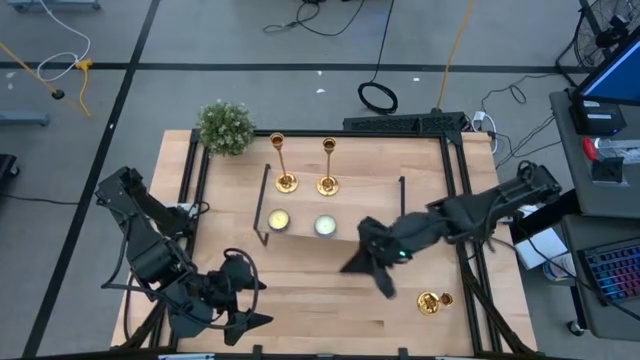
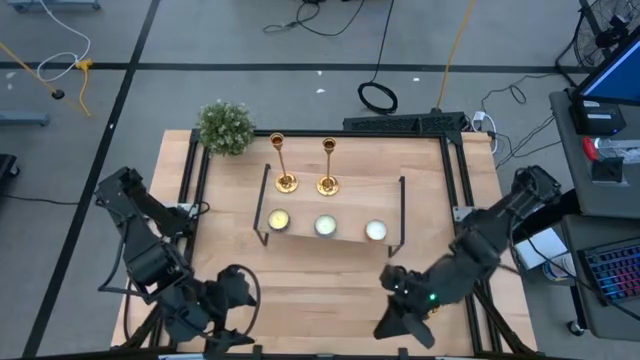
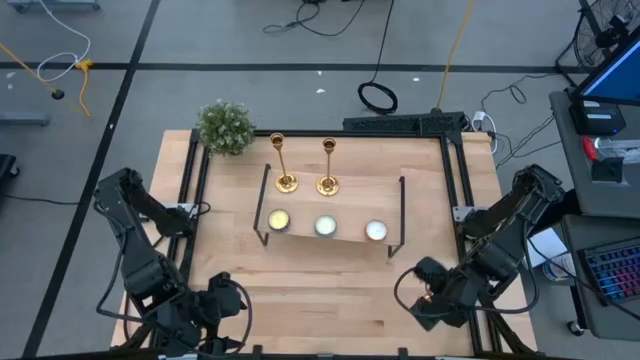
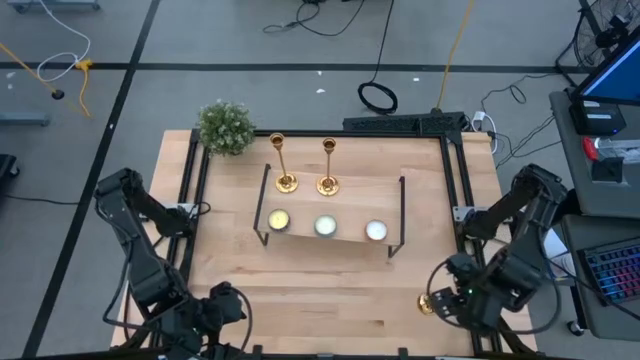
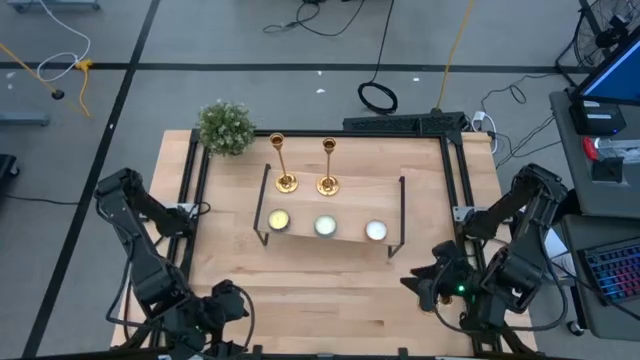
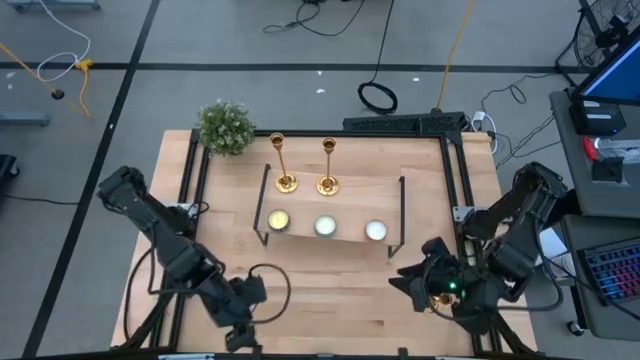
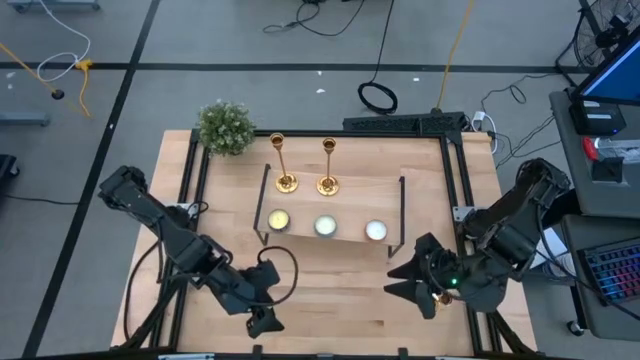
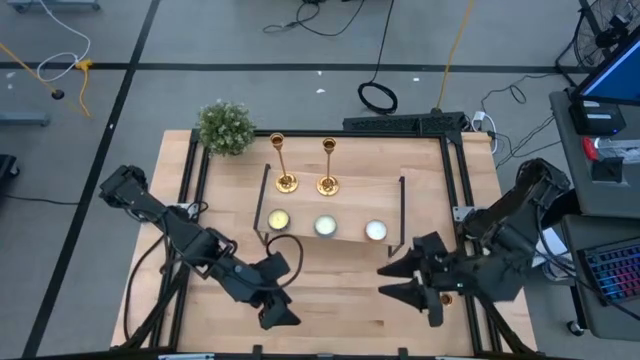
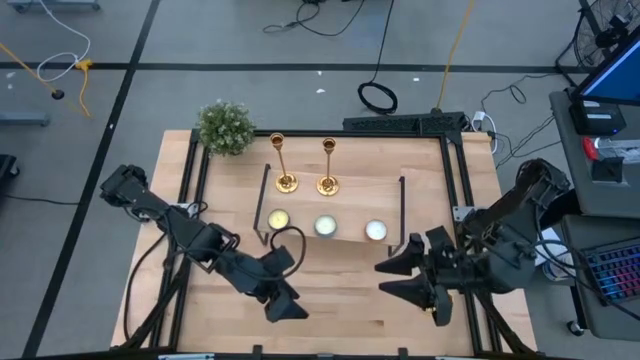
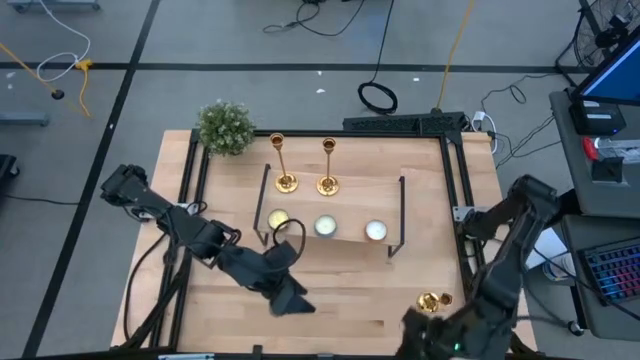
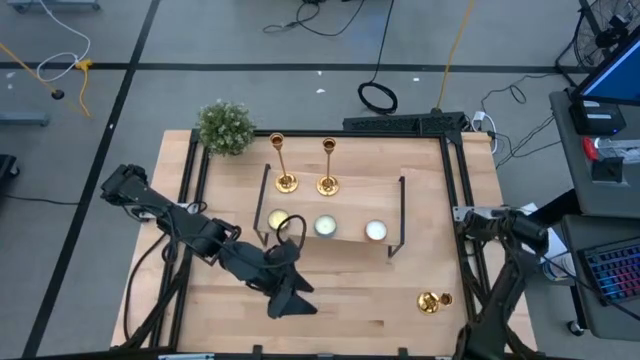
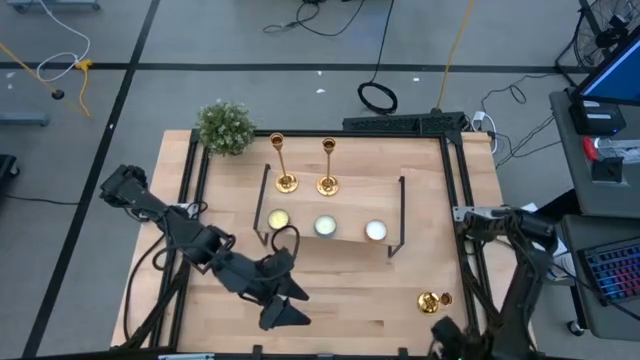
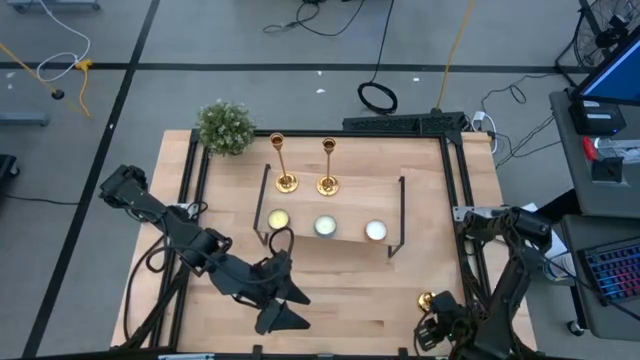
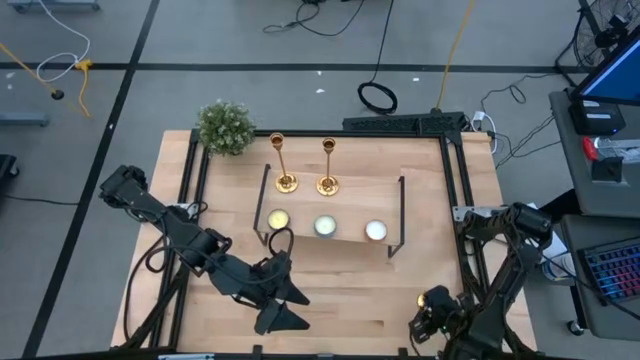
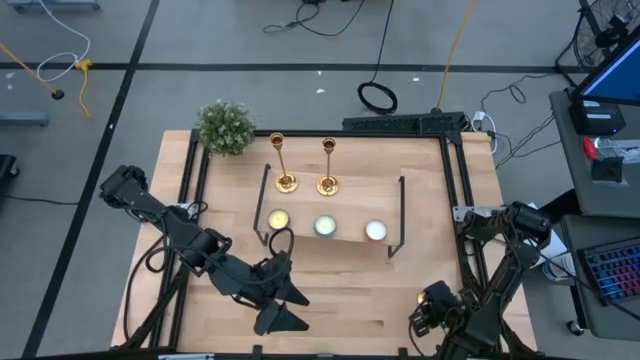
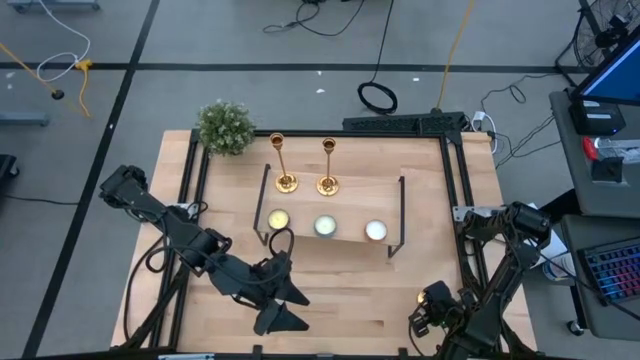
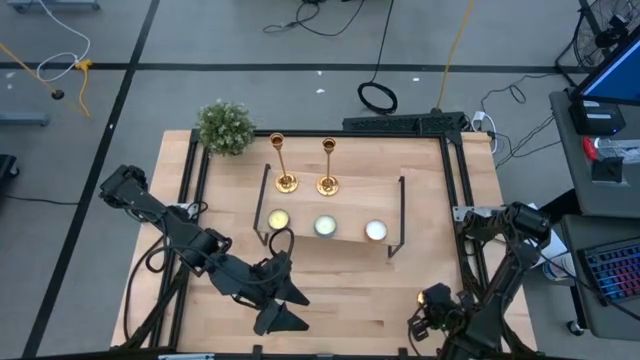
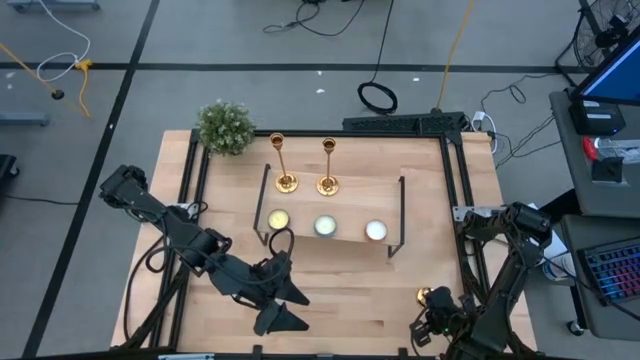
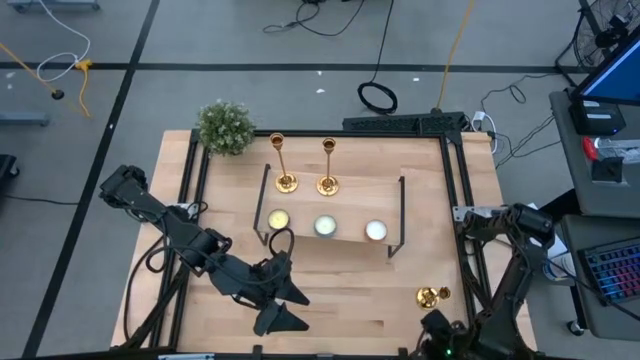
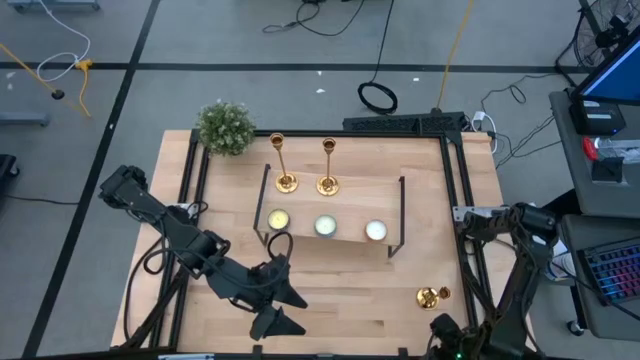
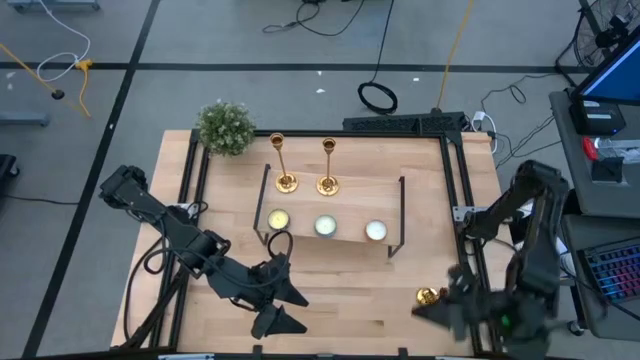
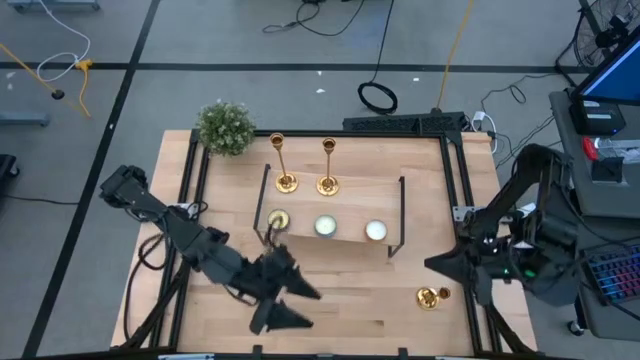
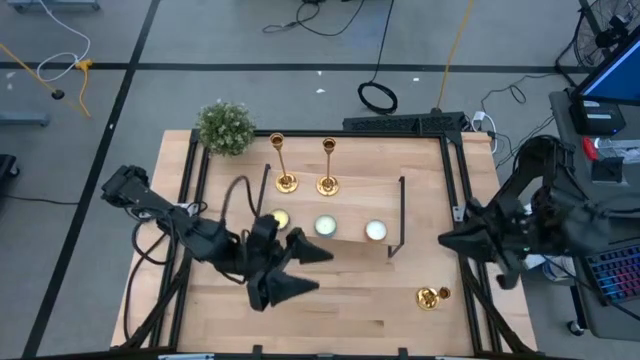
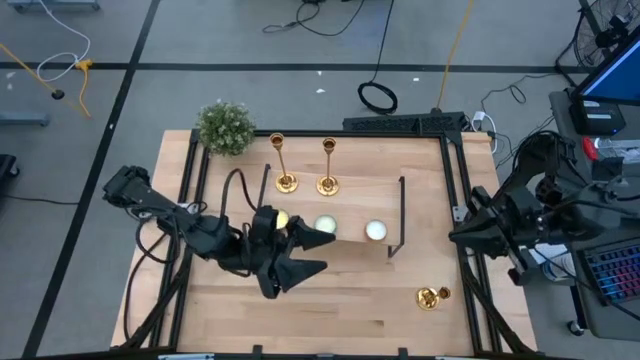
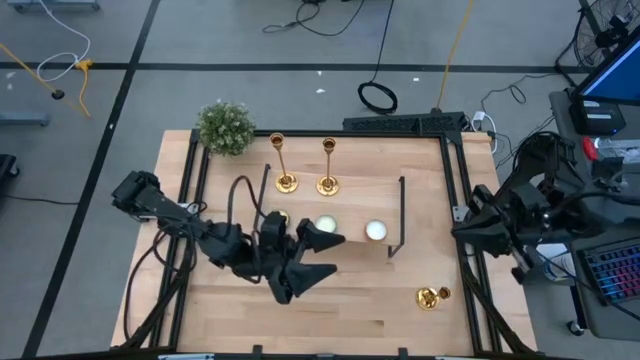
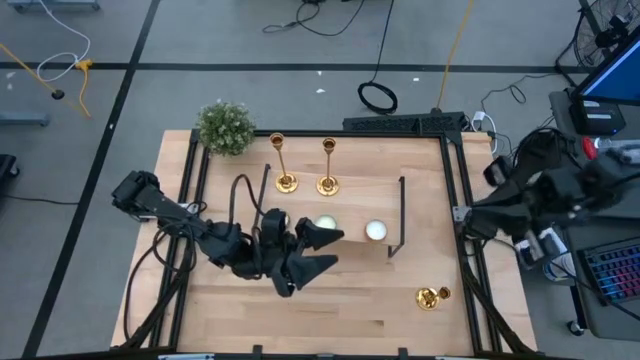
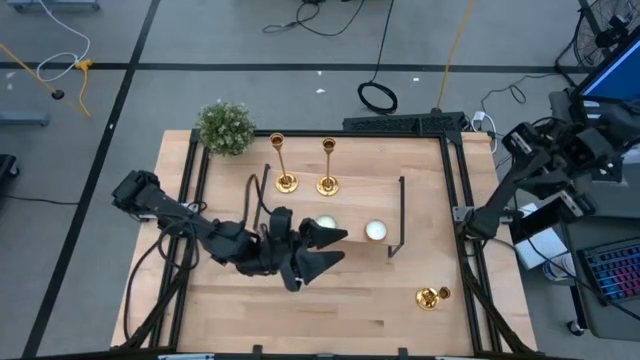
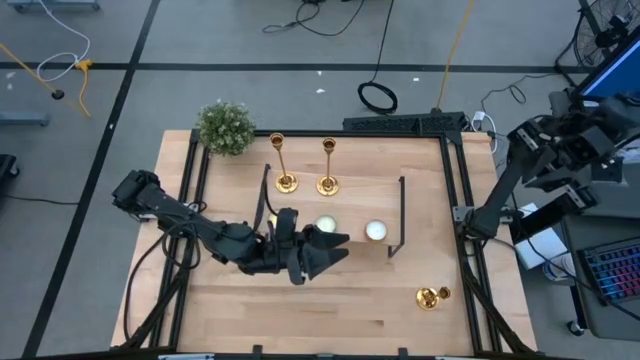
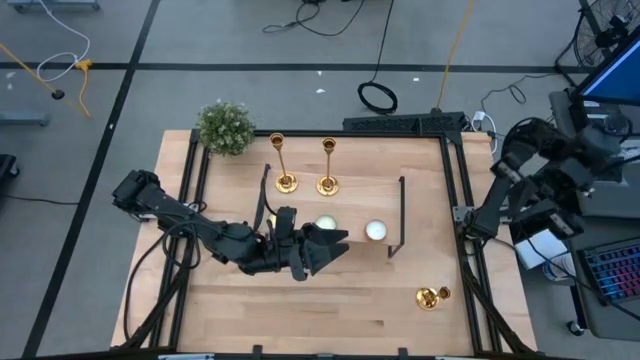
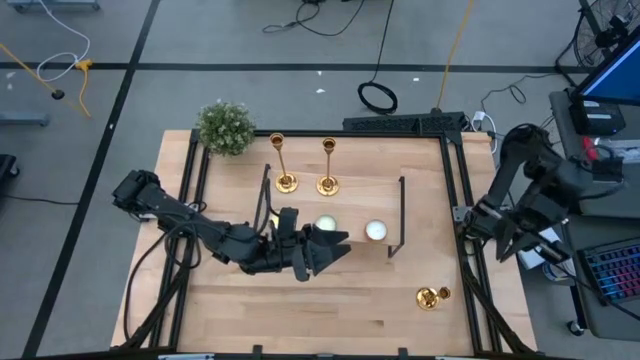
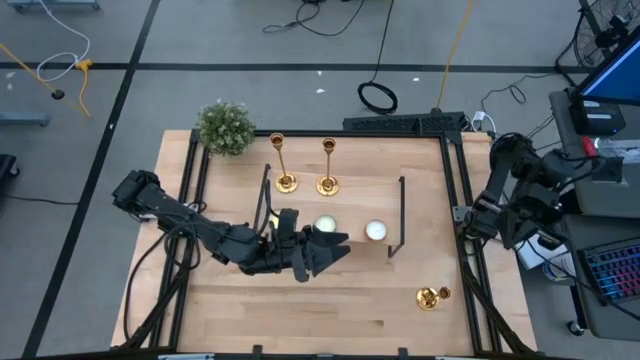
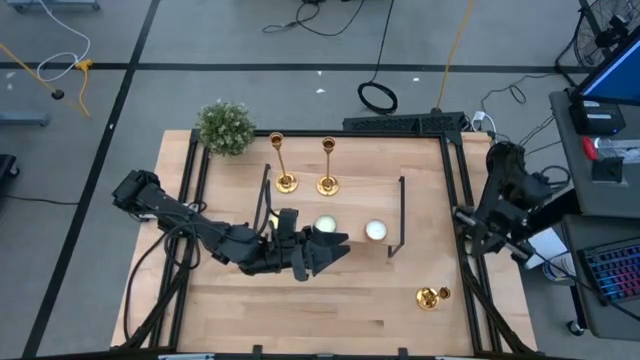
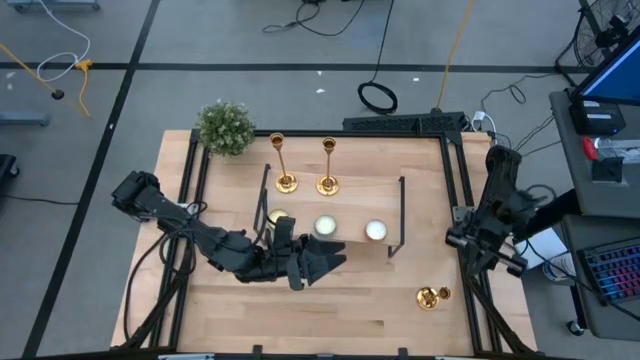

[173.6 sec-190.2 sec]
Task: Pick & Place candle stick holders
Put the gold candle holder onto the shelf

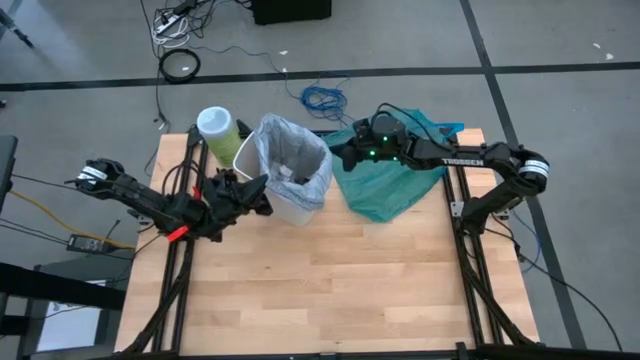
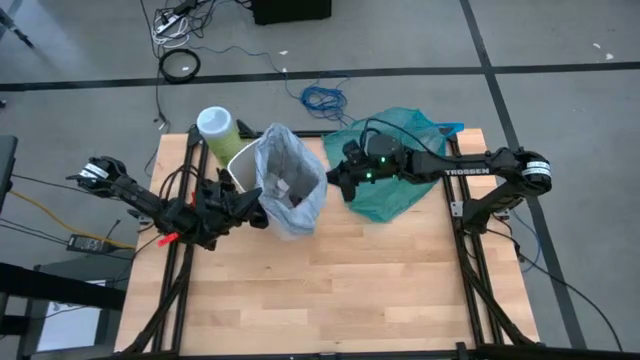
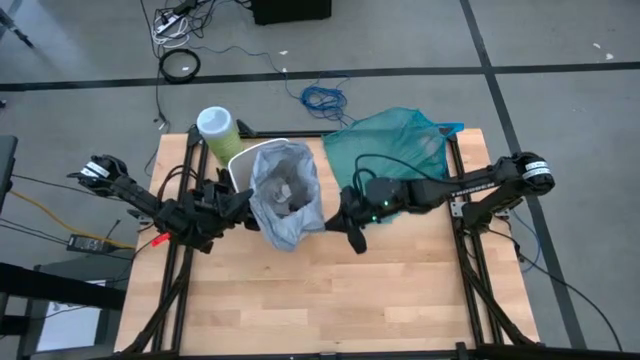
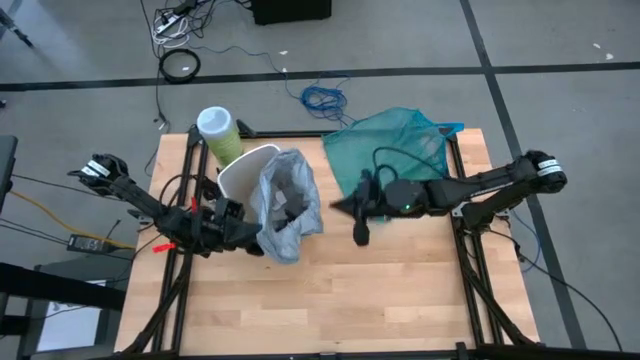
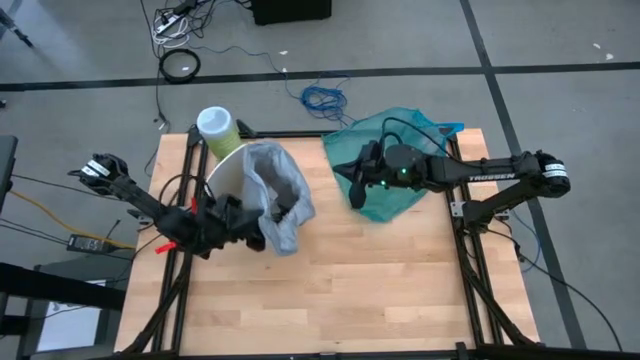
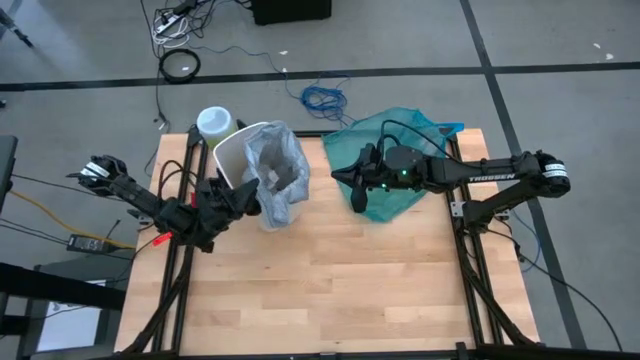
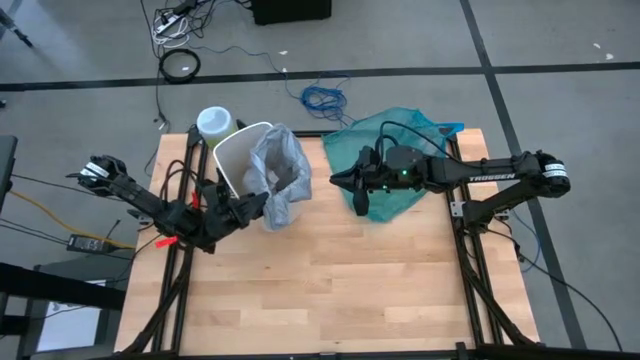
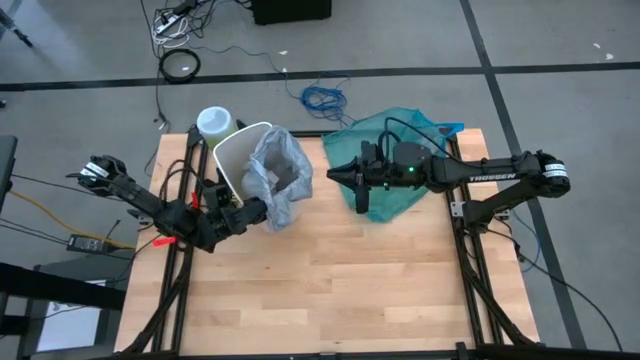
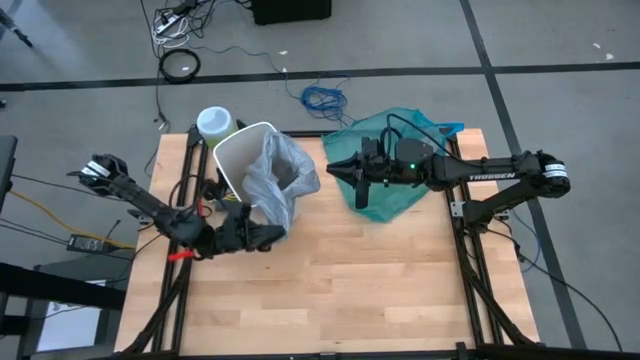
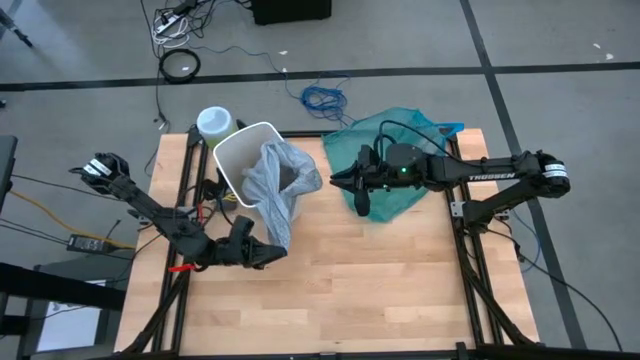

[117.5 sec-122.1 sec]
Task: place trash/remove bag and relplace
Remove the light blue trash bag from the trash bin
